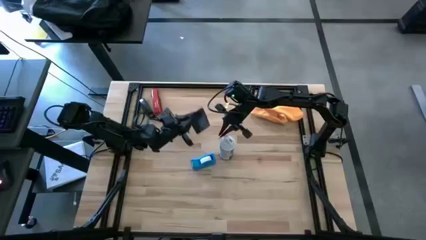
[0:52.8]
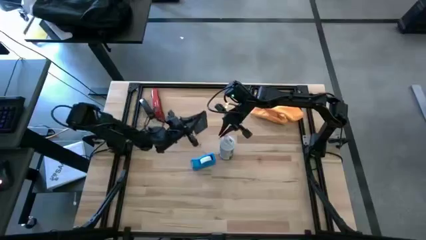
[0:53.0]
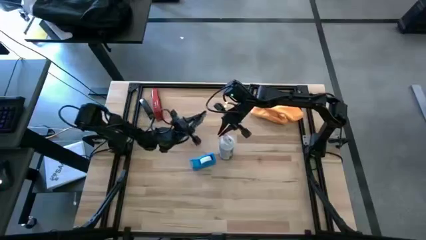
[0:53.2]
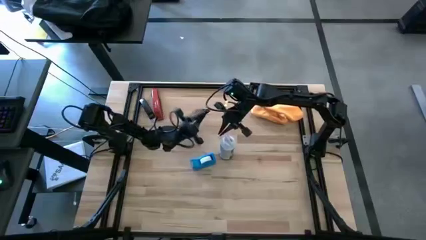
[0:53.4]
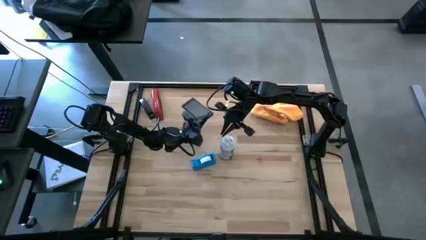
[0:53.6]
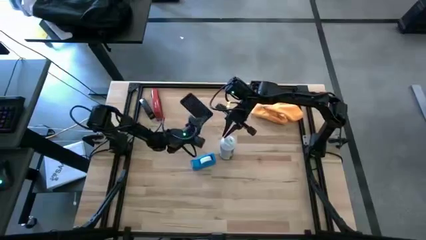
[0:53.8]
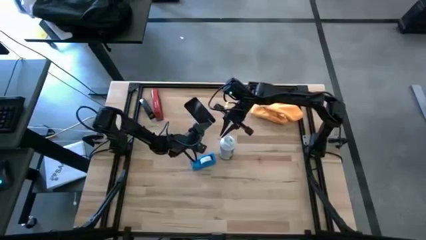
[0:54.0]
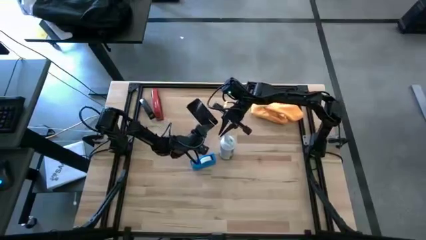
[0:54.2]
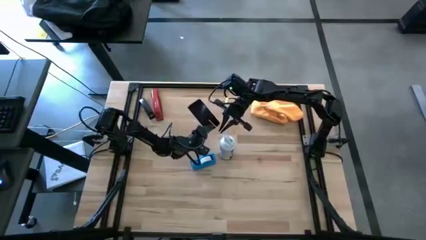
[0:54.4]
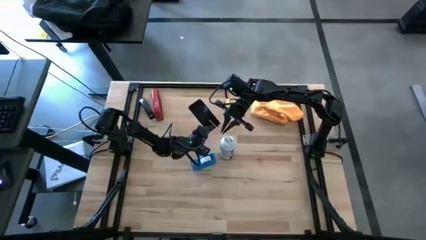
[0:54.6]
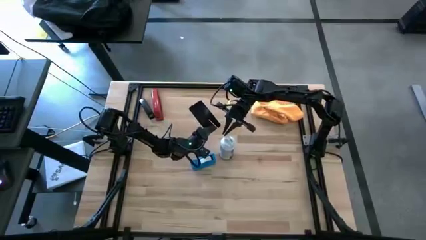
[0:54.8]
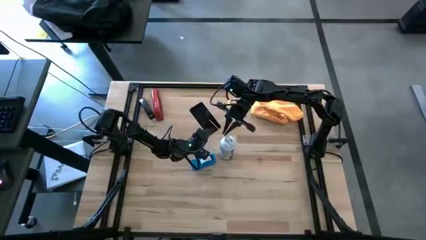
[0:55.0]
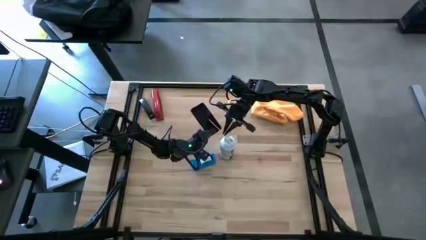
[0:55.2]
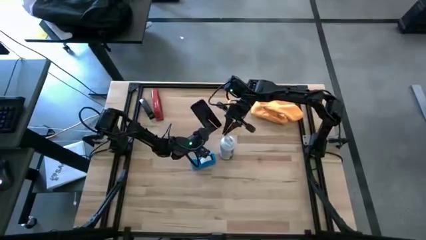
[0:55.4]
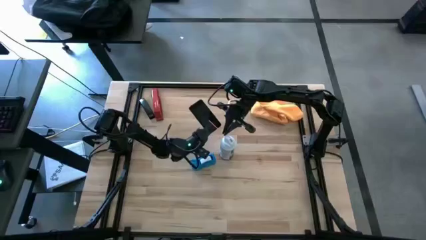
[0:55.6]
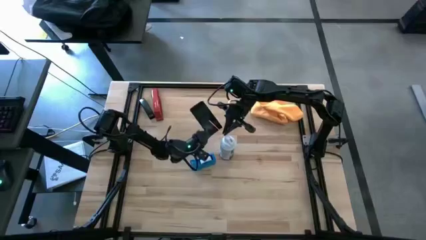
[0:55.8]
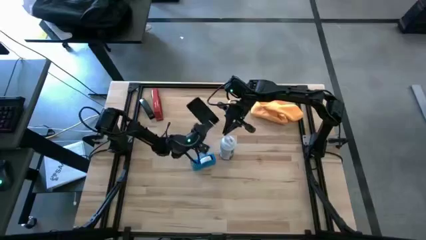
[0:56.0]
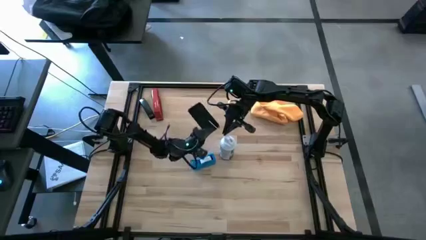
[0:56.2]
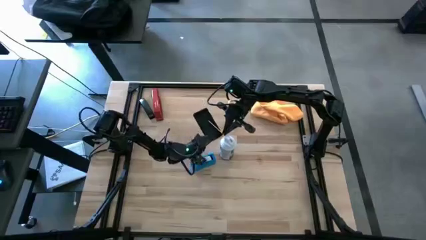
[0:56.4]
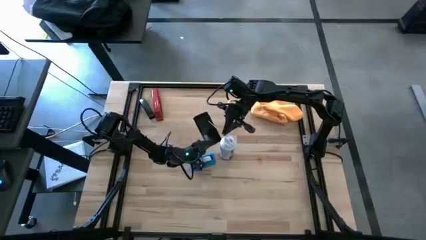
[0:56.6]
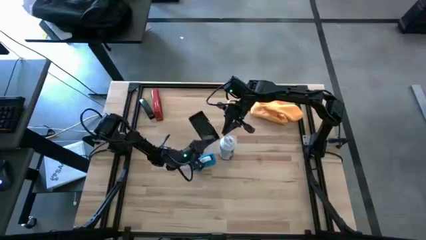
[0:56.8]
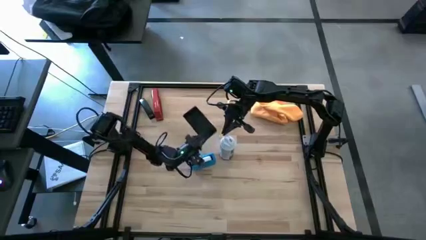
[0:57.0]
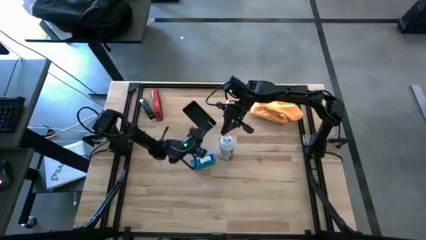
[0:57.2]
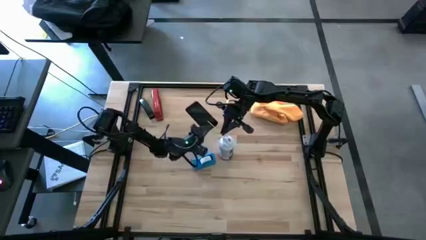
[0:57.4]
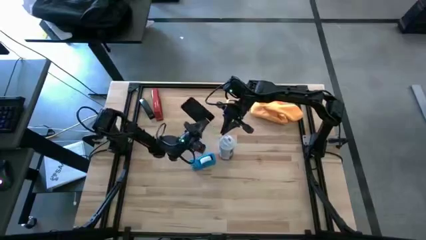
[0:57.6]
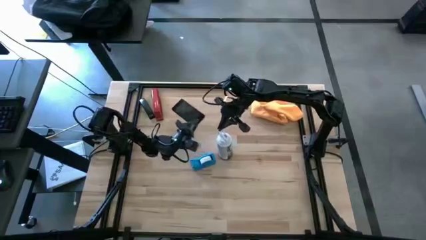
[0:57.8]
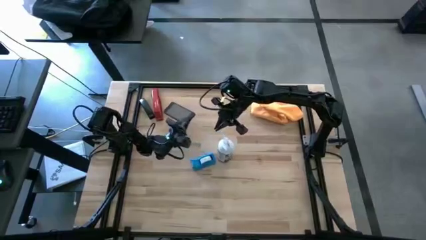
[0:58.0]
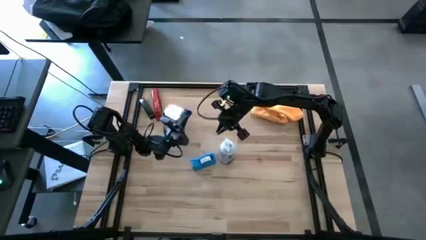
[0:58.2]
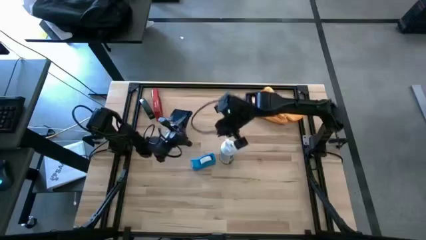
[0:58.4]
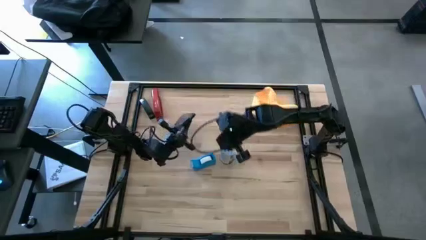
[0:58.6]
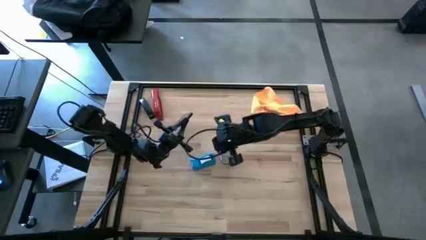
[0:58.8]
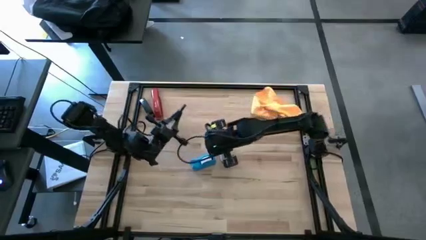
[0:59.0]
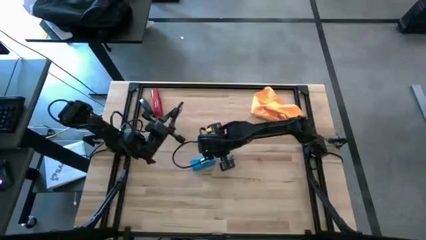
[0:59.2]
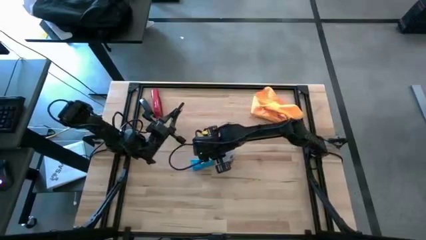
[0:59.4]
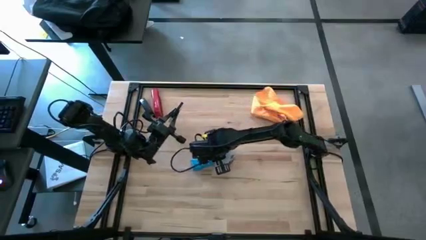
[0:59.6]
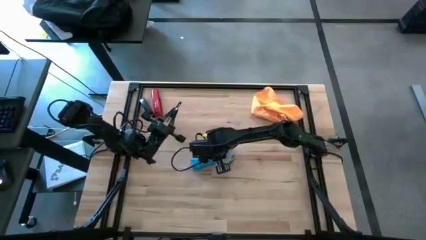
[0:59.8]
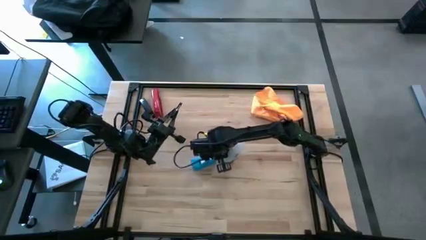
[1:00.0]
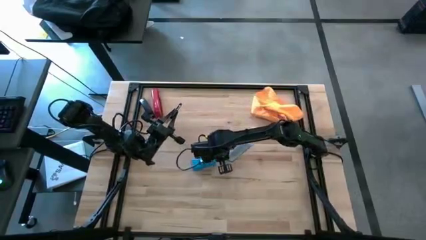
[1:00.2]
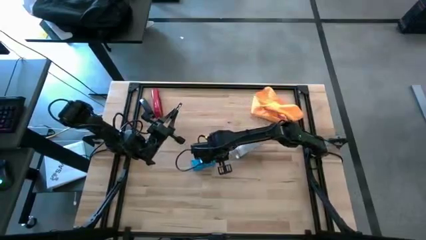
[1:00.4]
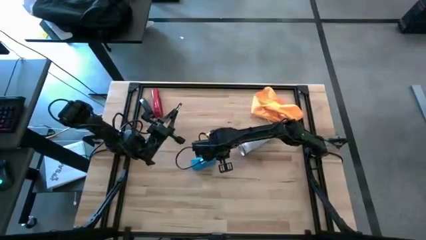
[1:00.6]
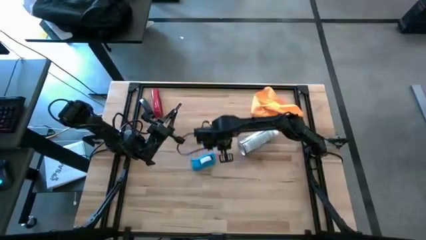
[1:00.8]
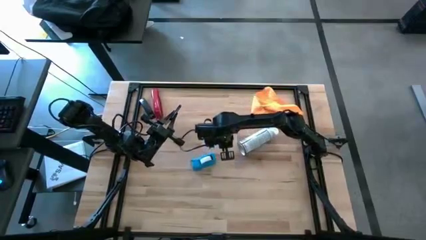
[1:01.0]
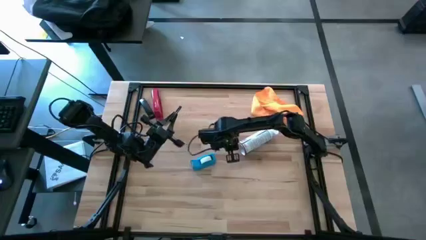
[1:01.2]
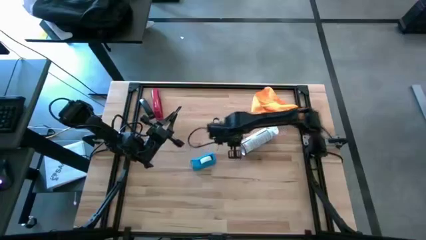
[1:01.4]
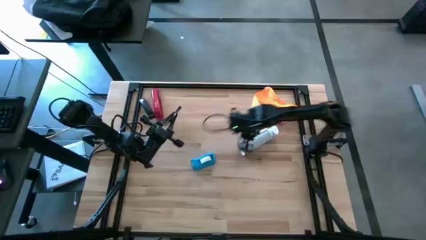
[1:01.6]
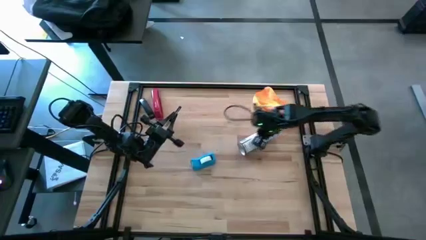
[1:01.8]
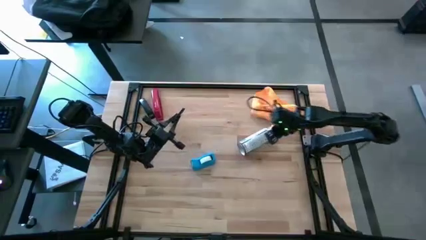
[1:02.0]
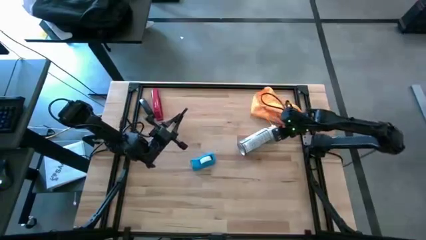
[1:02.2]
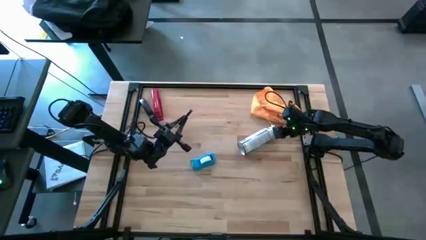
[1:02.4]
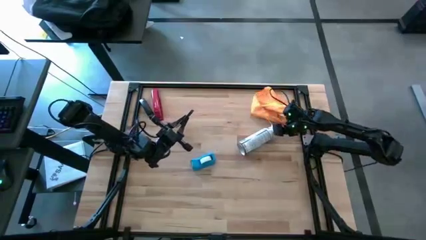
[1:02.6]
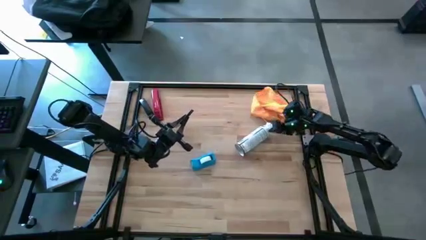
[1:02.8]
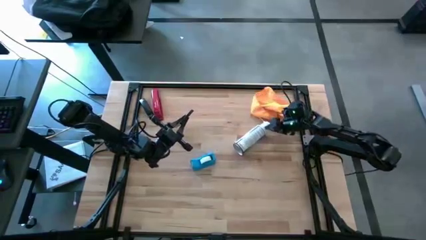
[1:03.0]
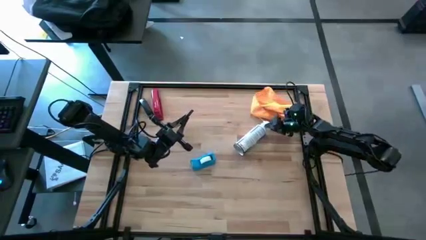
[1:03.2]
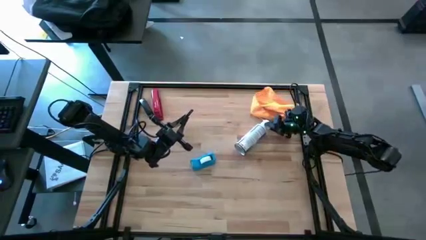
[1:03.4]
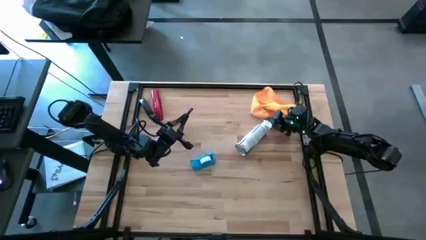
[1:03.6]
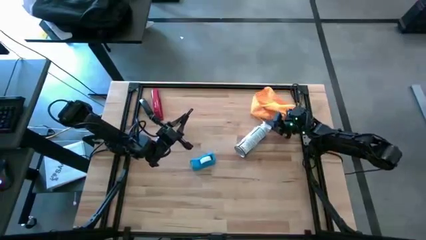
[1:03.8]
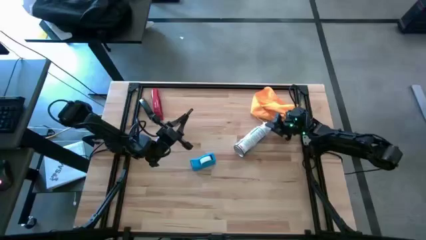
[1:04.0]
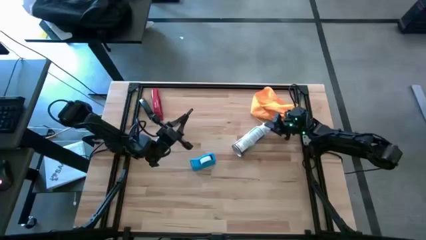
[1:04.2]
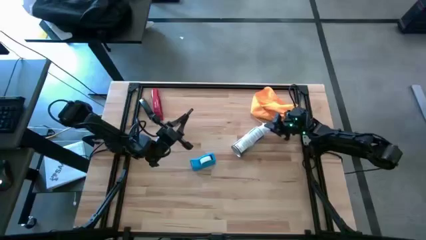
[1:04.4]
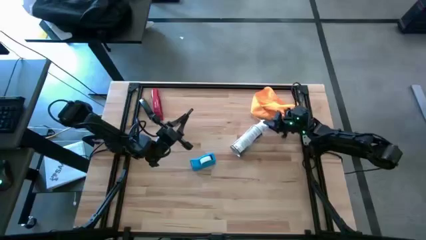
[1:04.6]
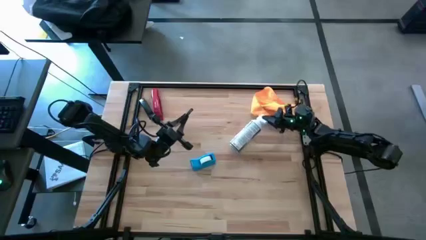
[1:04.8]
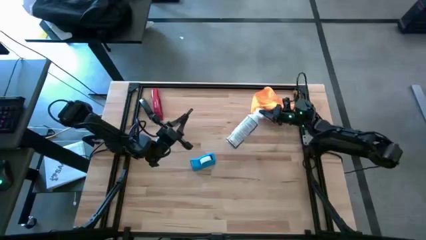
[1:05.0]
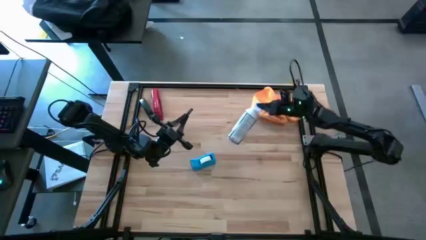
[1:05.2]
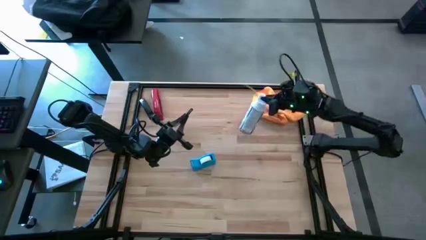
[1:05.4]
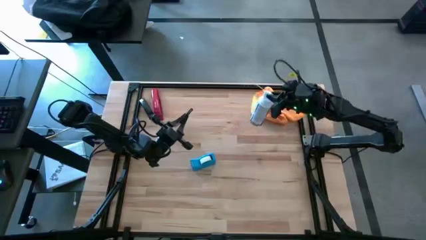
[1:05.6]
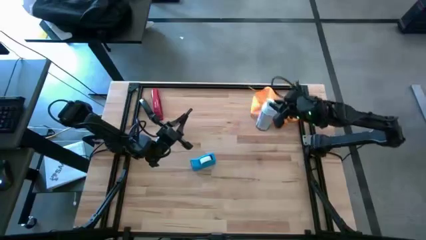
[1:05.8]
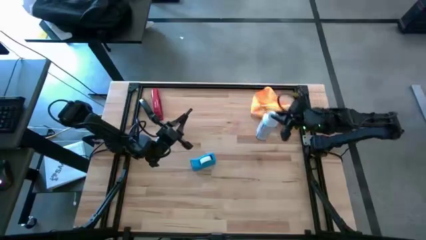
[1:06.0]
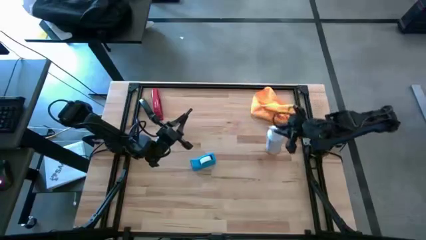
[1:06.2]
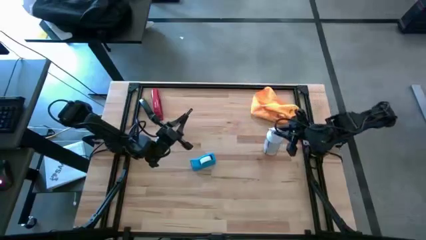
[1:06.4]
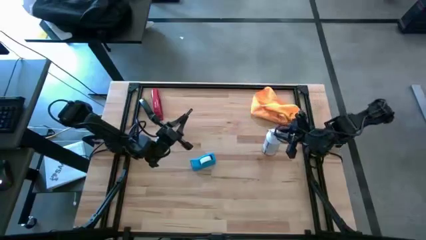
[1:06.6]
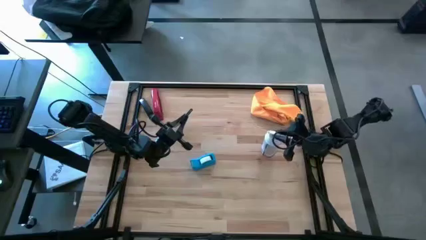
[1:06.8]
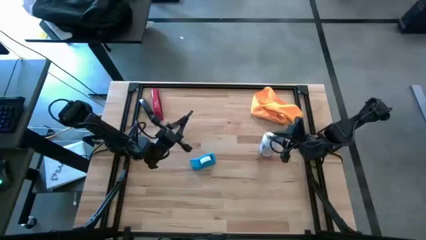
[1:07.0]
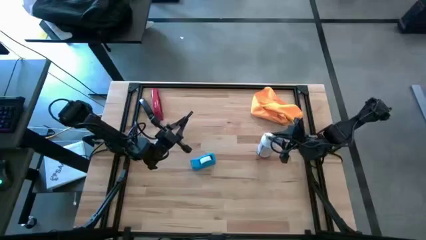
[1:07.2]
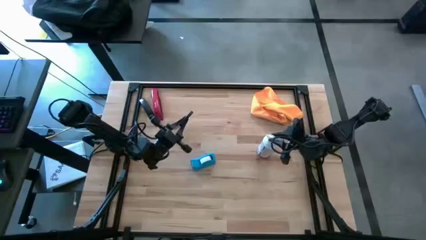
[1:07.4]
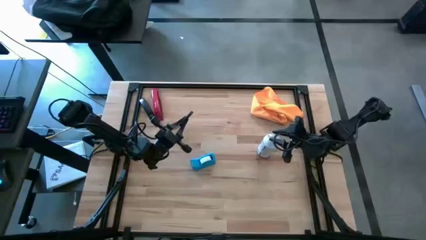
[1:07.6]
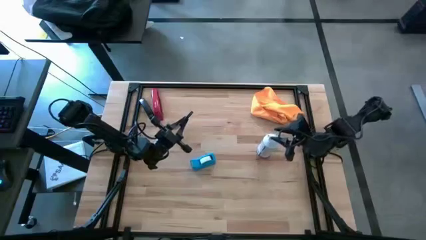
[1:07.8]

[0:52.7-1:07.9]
Task: Apply microfiber cloth
Spray the front of the black cellphone using the white spray bottle
